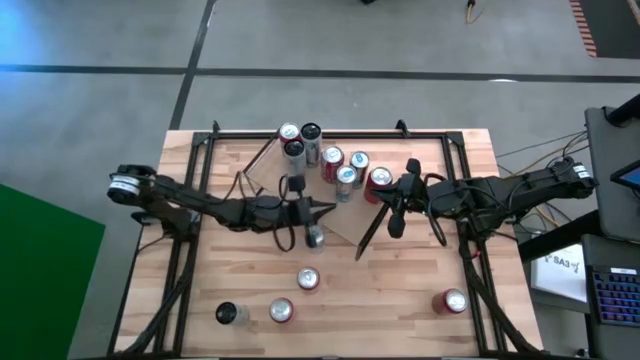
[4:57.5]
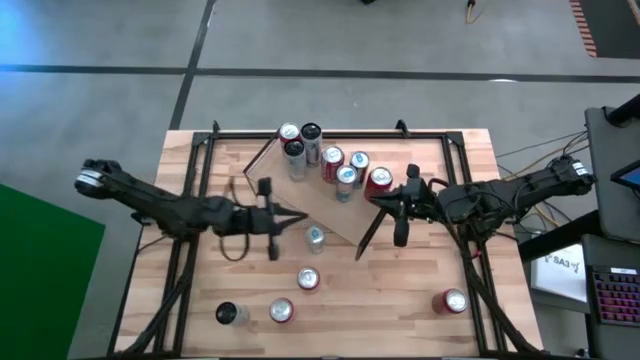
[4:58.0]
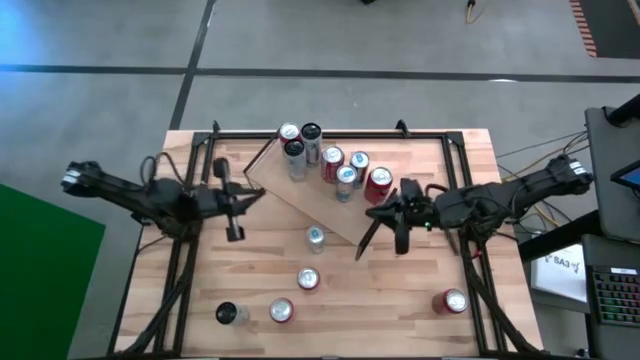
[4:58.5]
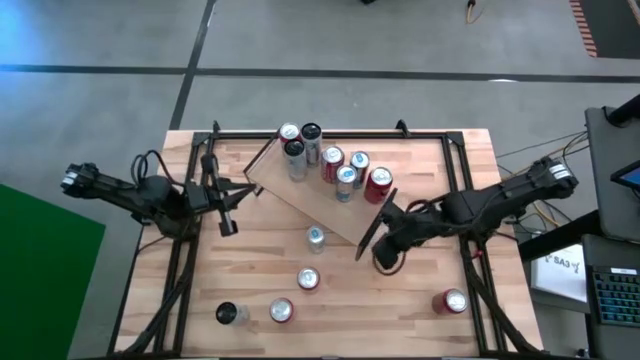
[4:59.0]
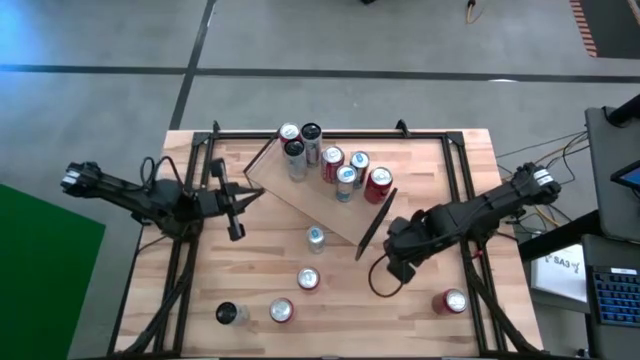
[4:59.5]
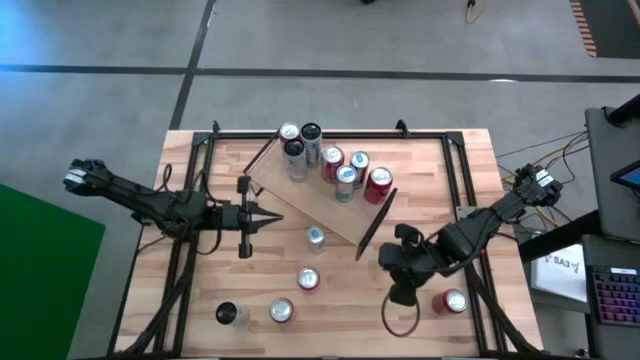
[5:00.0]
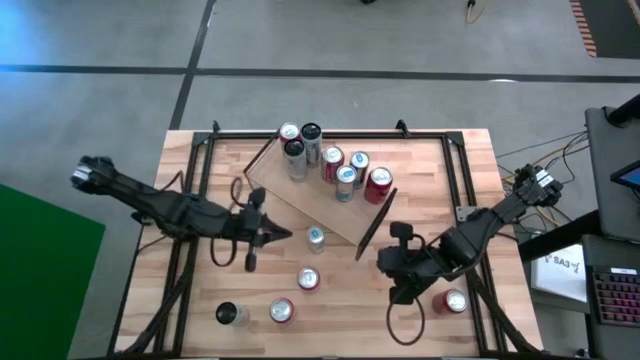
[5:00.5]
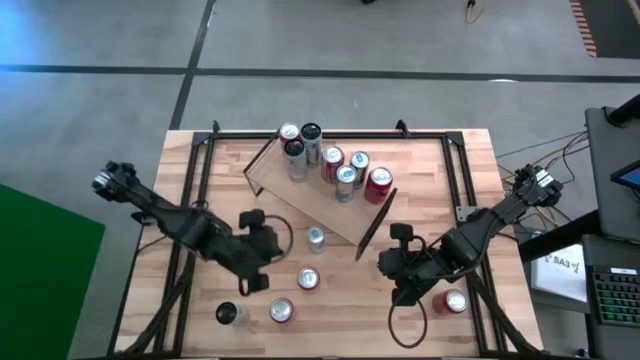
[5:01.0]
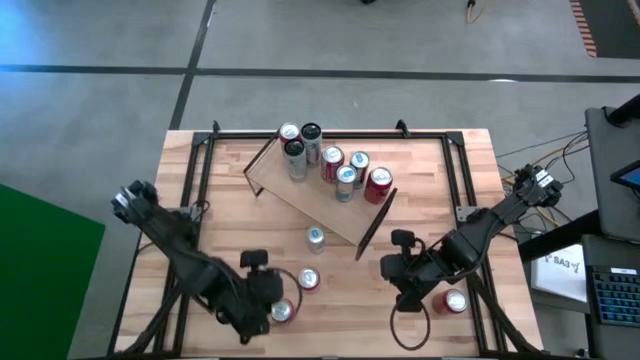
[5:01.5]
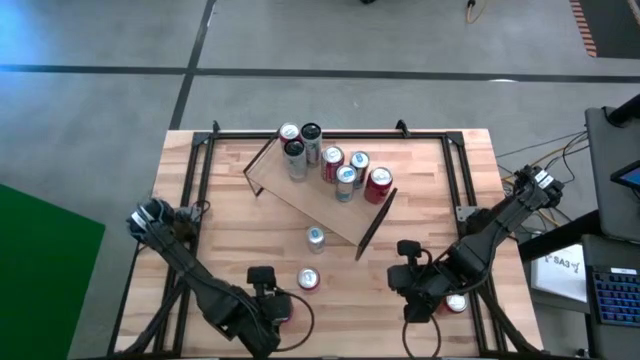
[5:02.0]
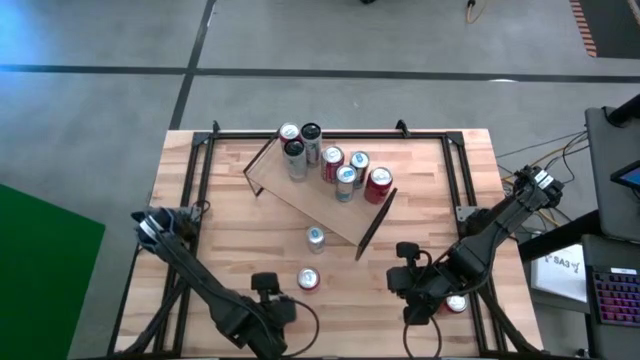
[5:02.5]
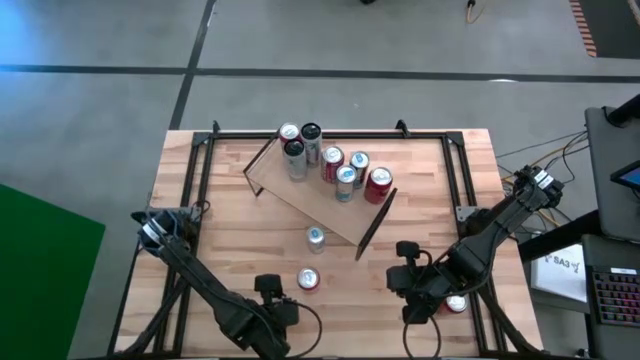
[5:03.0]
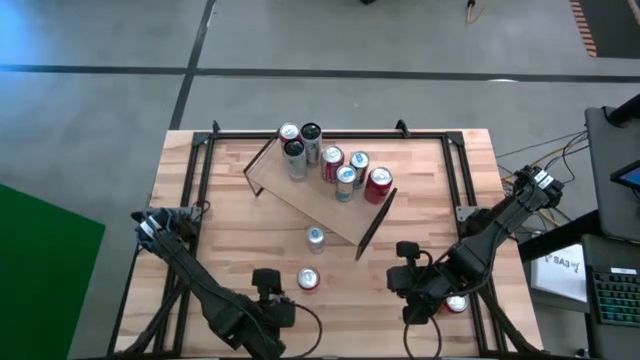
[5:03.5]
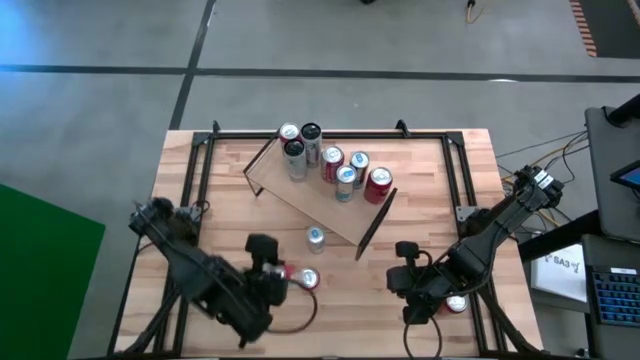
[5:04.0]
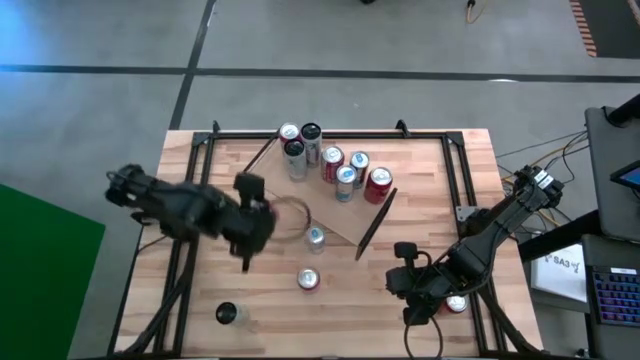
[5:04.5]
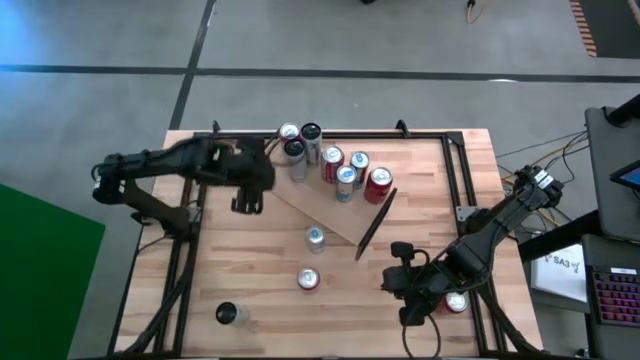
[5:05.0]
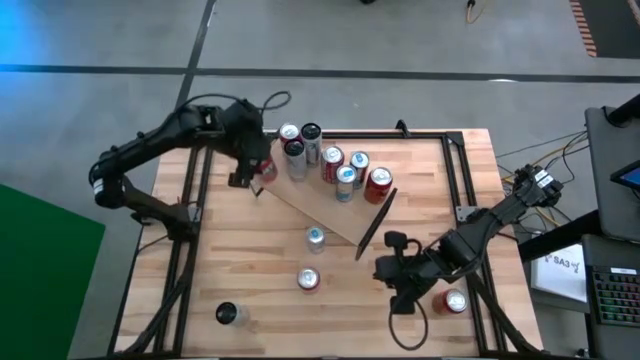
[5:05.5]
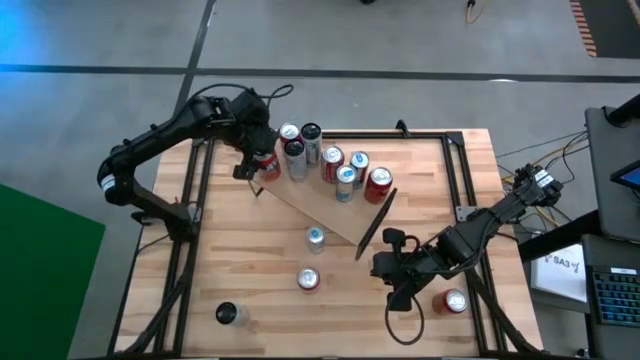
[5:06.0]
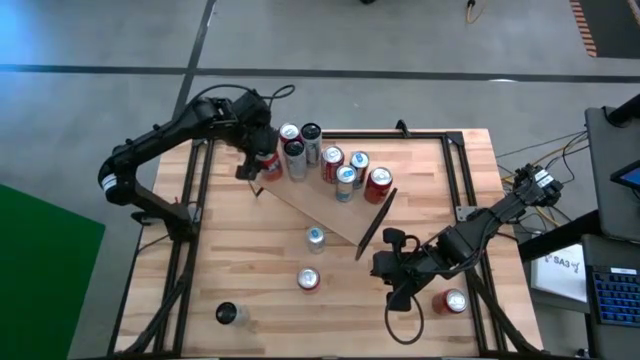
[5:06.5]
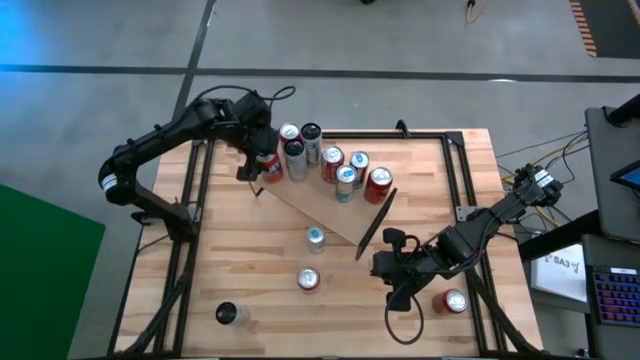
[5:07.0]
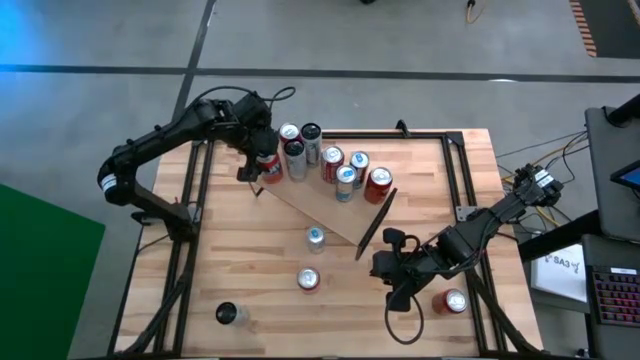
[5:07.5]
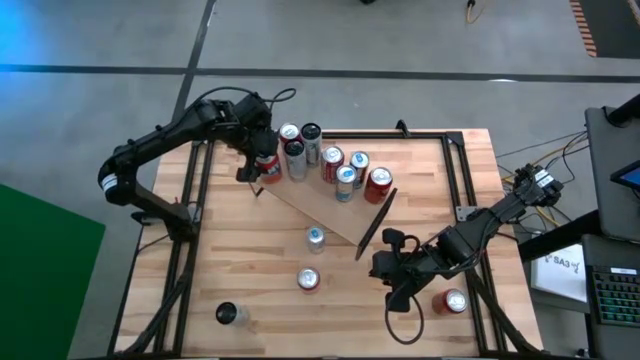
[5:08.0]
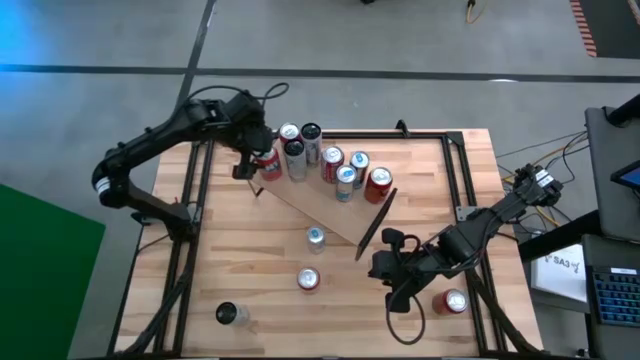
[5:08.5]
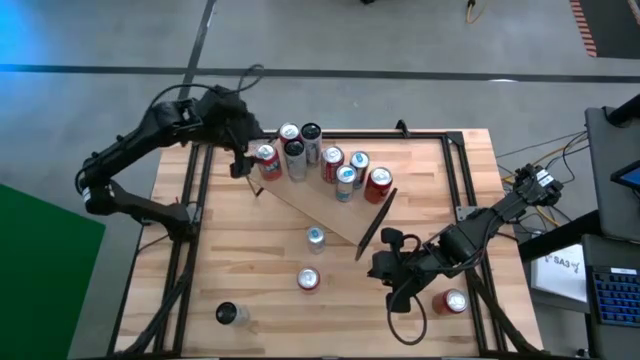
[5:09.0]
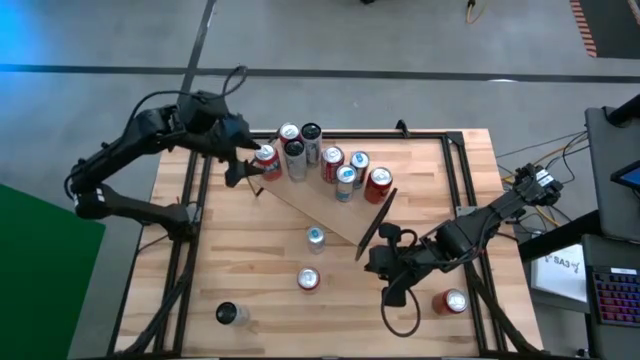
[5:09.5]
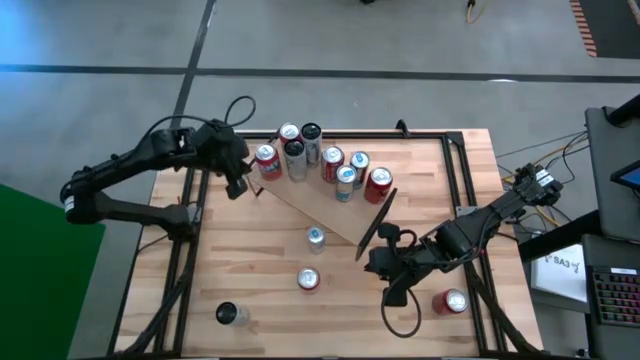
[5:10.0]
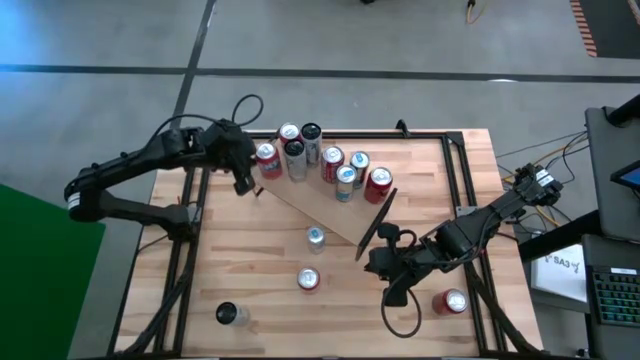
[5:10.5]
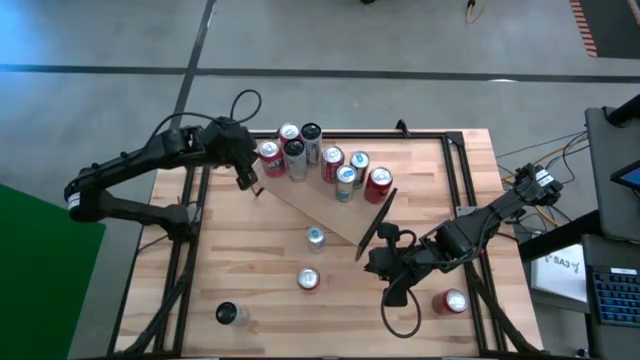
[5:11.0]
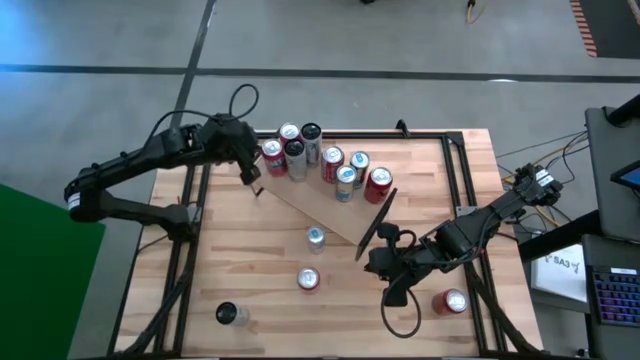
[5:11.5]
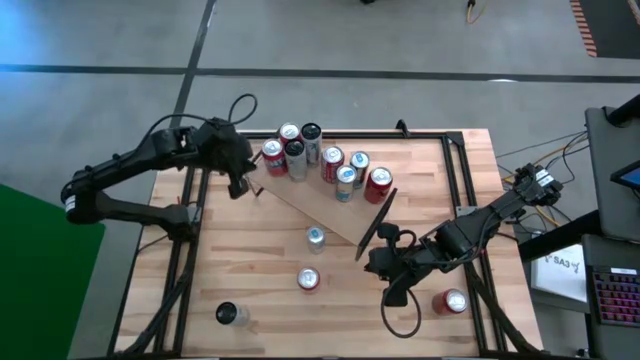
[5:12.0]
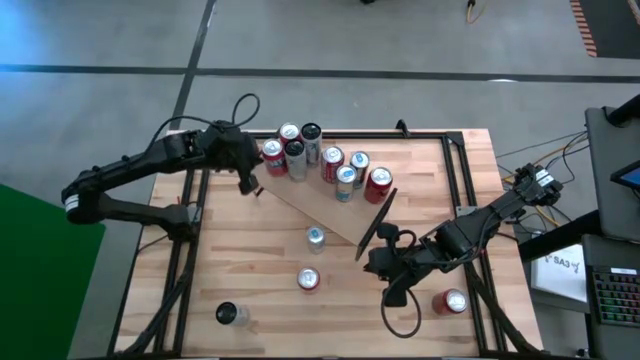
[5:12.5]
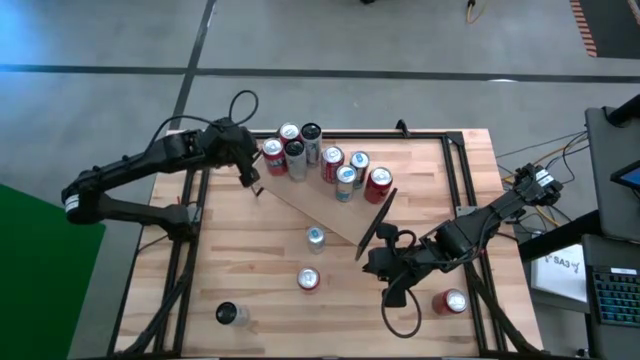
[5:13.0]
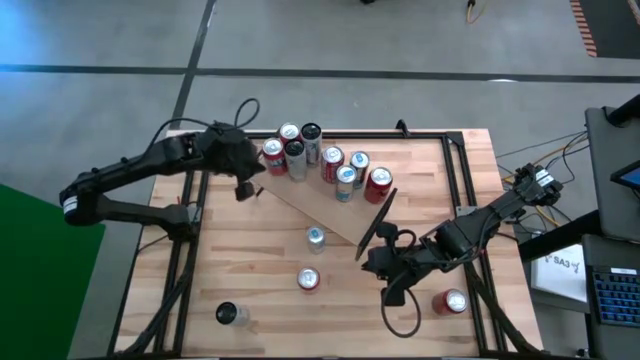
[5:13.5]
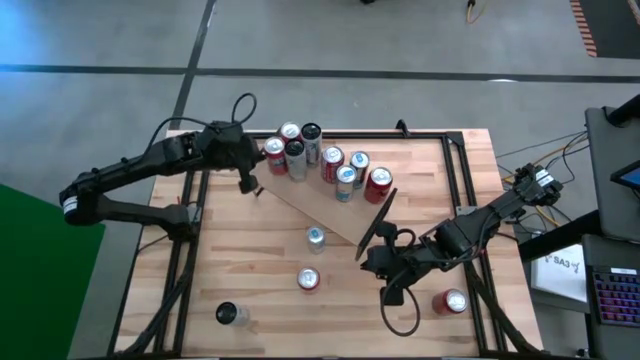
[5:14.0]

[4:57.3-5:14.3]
Task: Place canned beverage on shelf
Put the red soda can on the shelf, align with the other red soda can

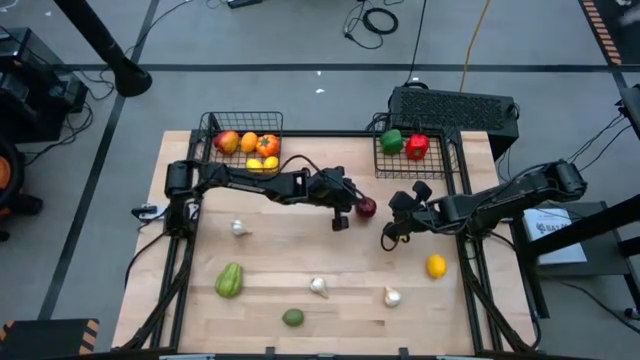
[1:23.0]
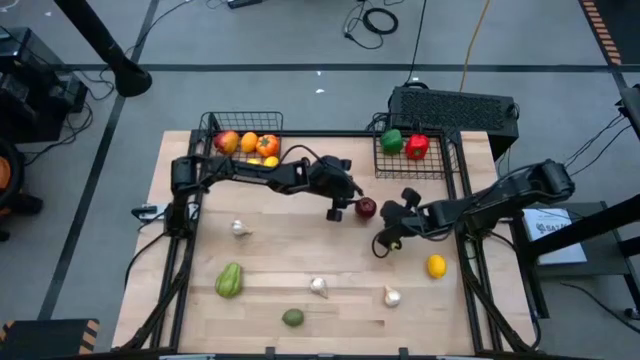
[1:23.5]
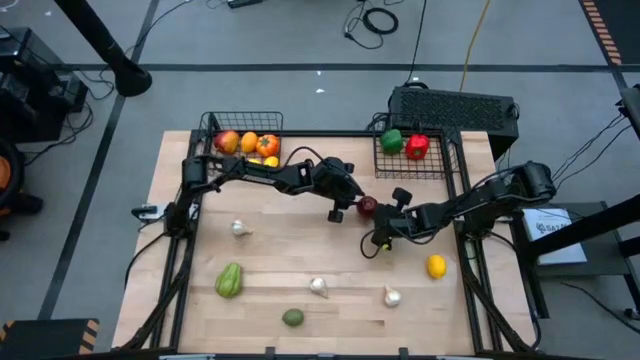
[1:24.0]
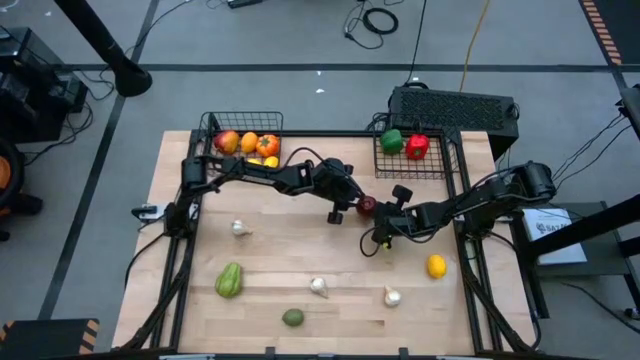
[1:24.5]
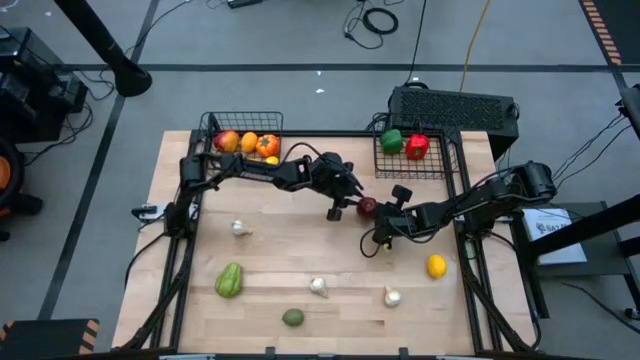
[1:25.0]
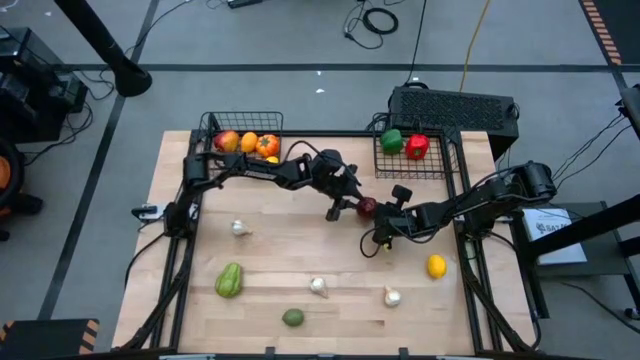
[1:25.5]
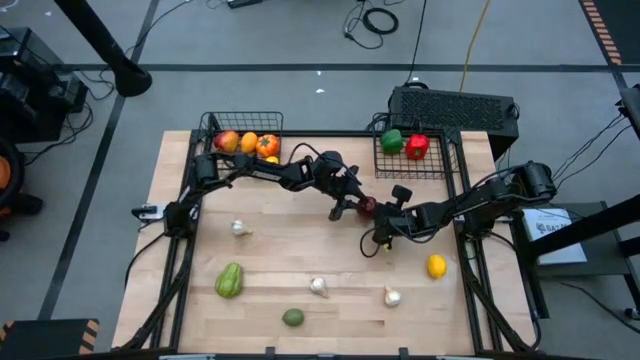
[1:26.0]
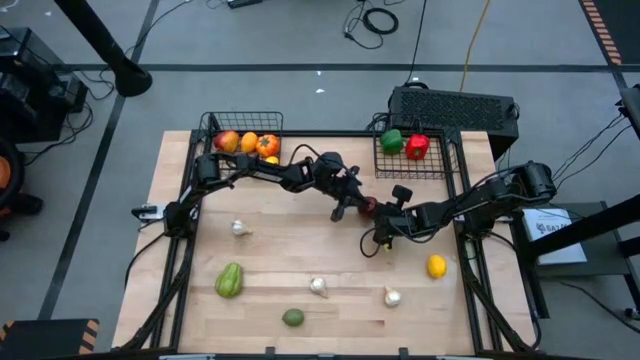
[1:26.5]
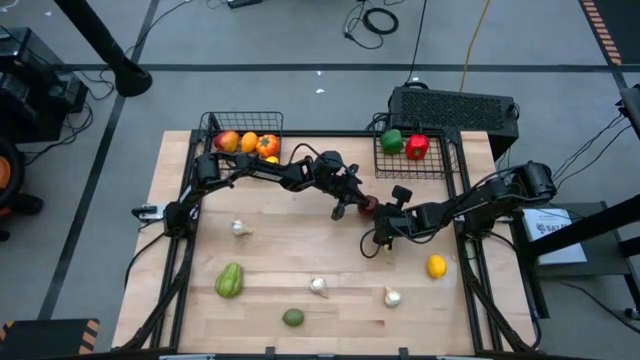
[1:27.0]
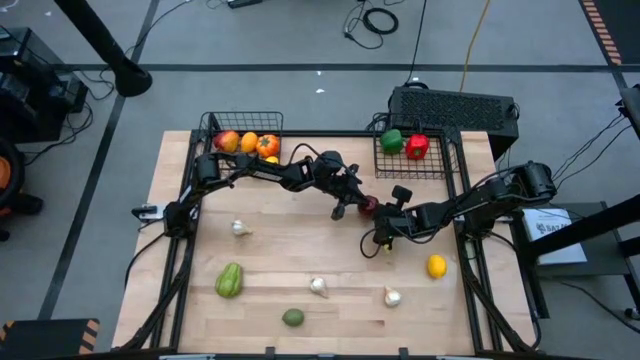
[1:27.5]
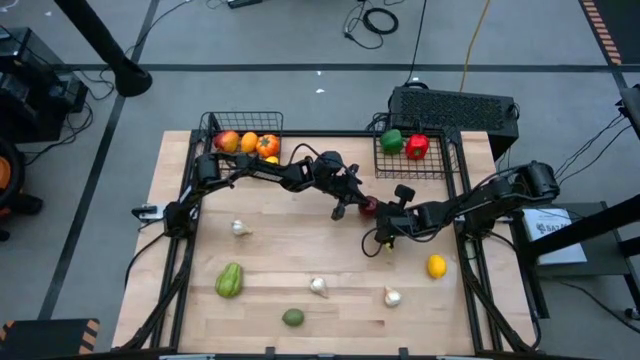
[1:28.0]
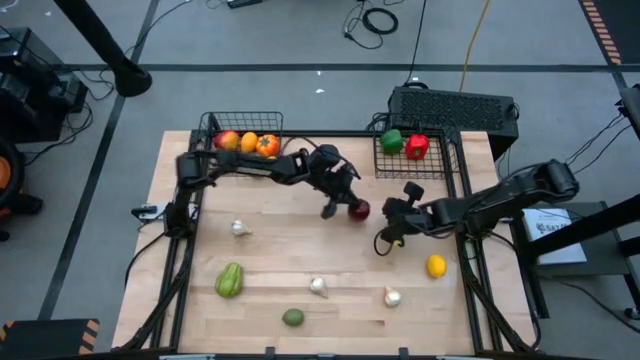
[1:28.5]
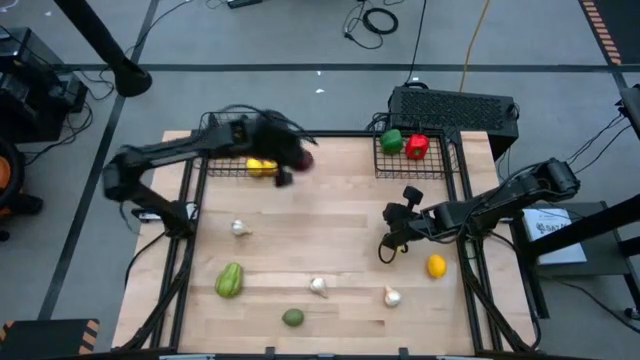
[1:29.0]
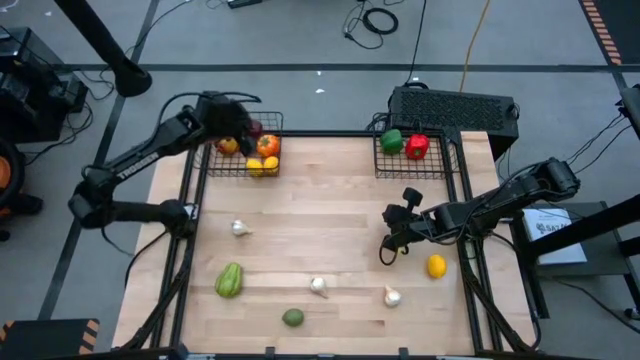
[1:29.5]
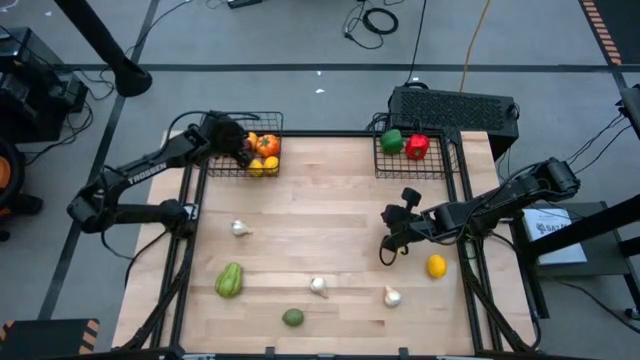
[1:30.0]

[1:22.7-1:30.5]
Task: Sort produce into baskets
Put the red apple in the left basket
